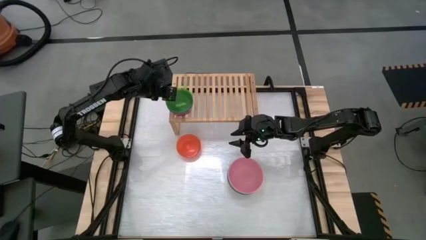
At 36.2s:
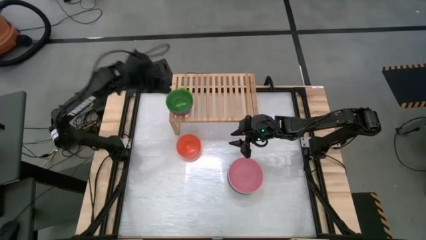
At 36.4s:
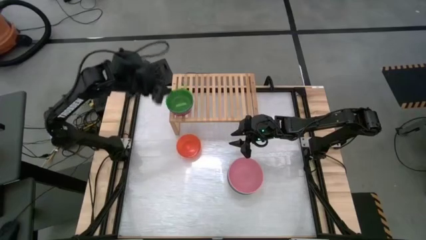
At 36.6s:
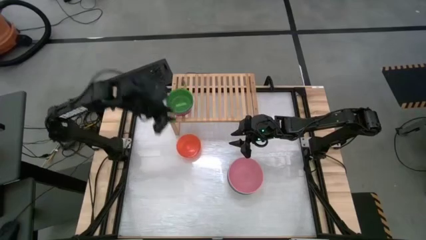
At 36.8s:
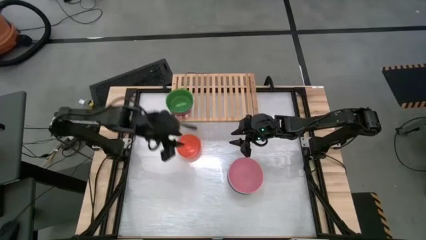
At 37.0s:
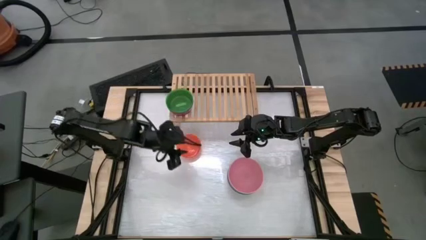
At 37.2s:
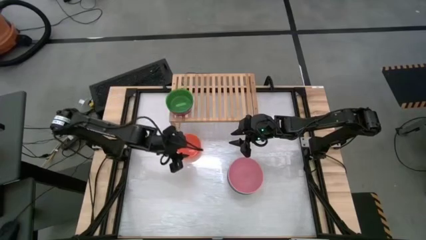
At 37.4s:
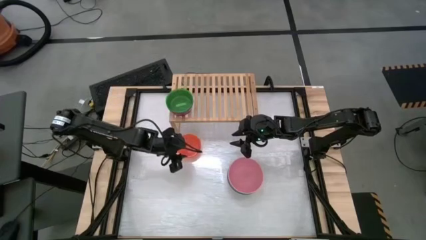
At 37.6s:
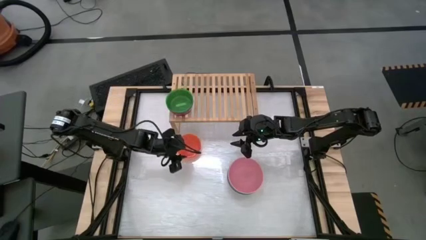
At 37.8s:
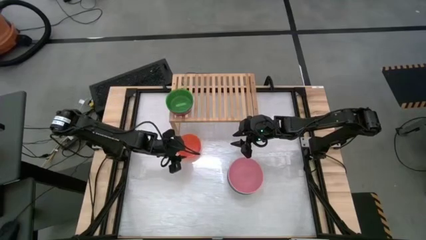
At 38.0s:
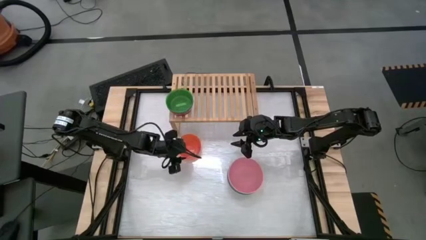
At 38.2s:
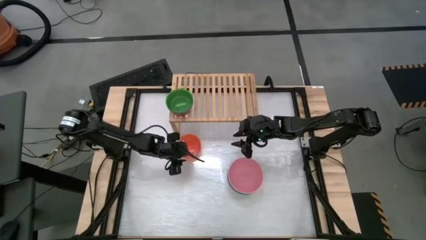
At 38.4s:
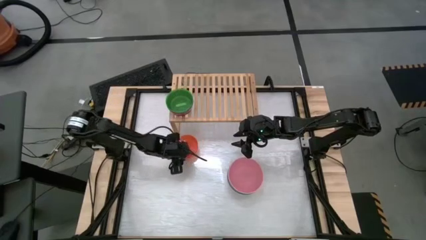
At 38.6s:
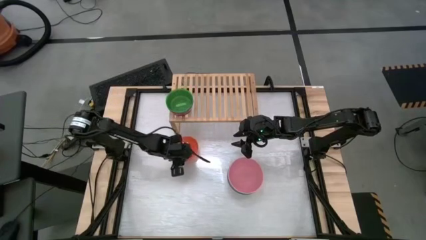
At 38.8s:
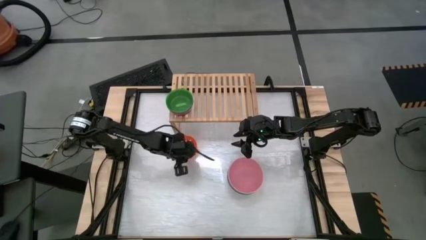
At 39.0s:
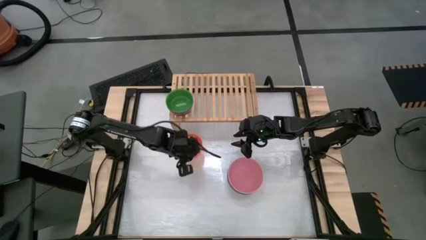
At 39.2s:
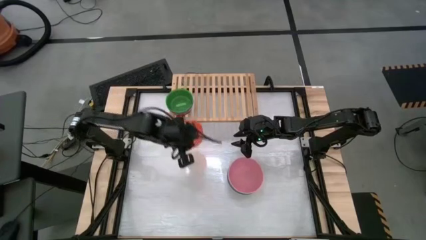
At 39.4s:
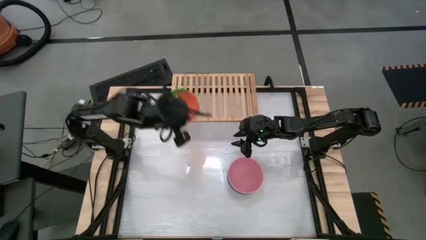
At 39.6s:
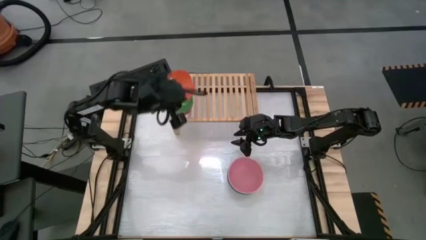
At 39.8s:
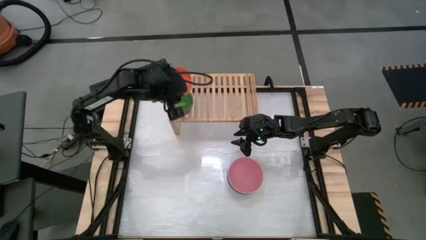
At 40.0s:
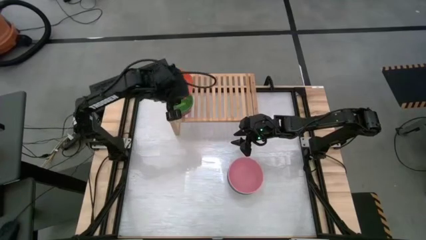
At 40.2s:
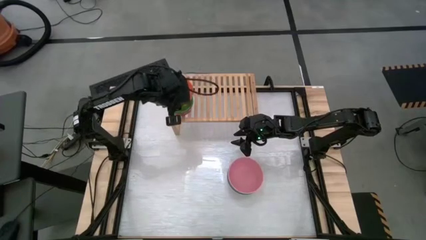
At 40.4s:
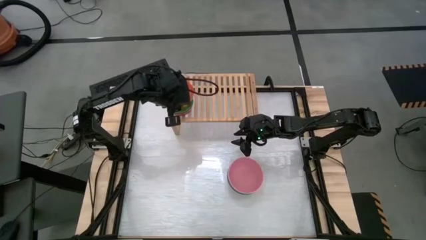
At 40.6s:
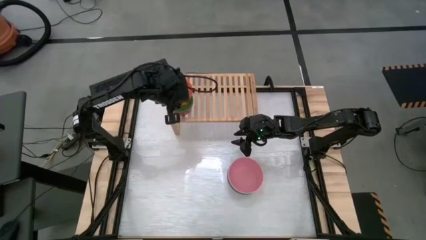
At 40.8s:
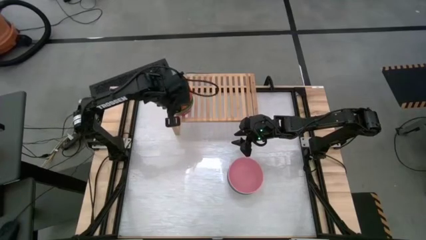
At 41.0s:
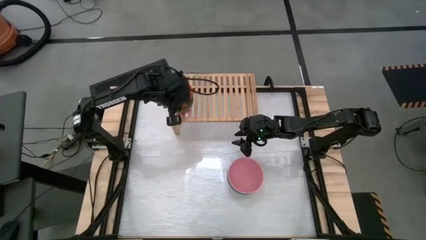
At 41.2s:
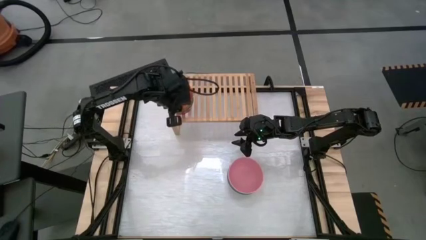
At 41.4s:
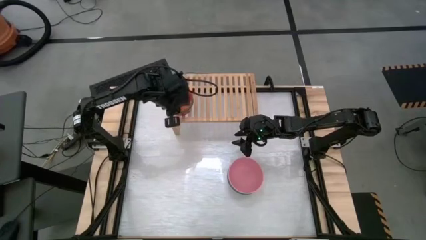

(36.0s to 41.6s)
Task: Place and stack bowls onto a shelf
Stack the orange bowl on top of the green bowl on the shelf

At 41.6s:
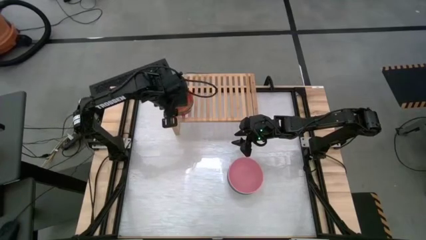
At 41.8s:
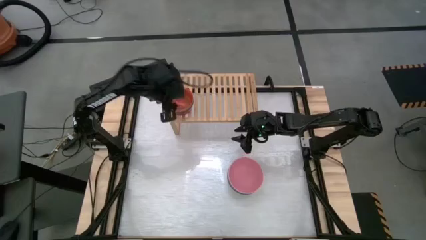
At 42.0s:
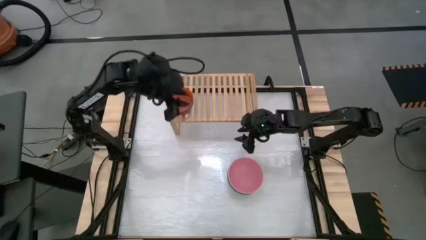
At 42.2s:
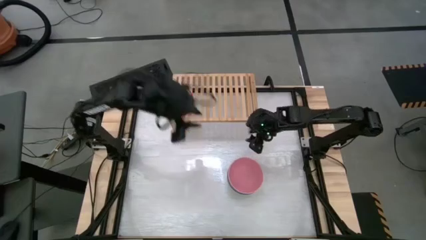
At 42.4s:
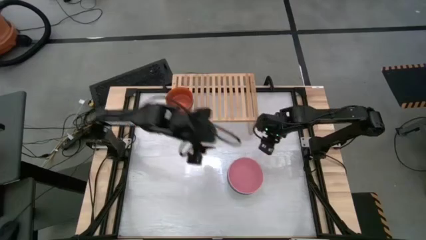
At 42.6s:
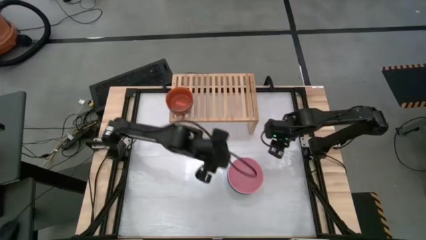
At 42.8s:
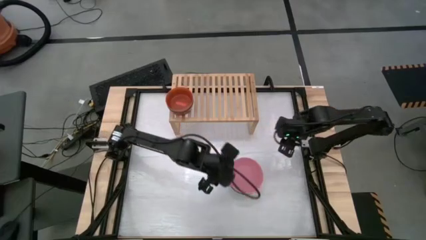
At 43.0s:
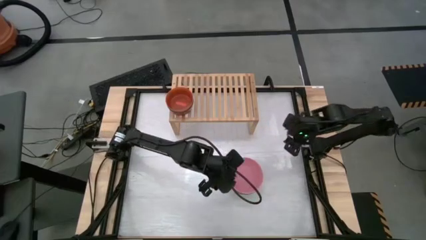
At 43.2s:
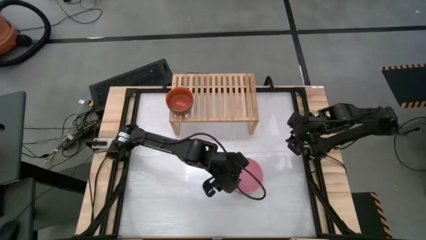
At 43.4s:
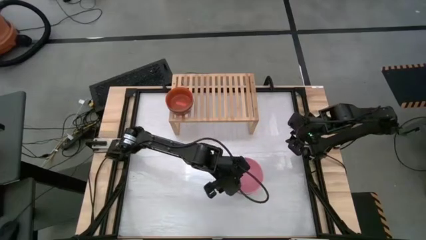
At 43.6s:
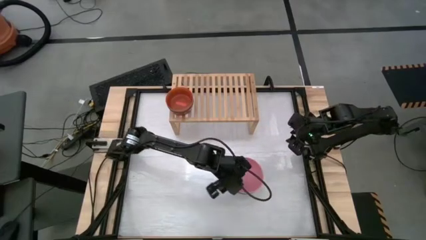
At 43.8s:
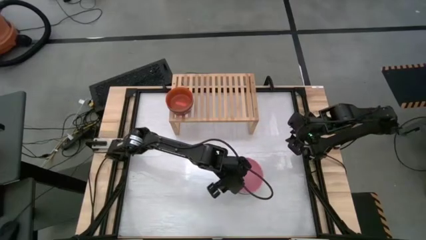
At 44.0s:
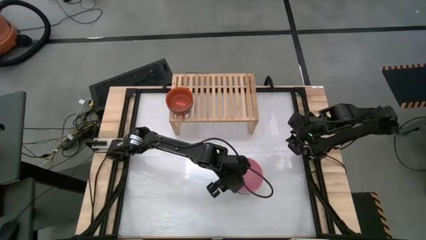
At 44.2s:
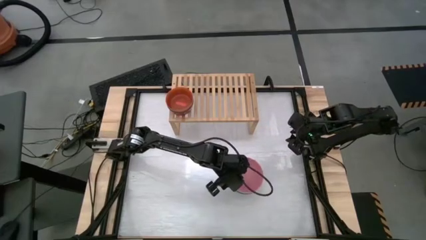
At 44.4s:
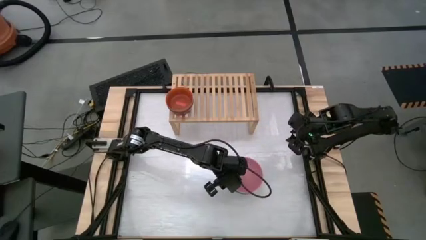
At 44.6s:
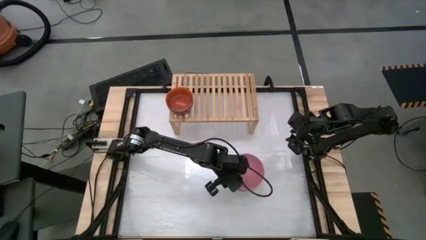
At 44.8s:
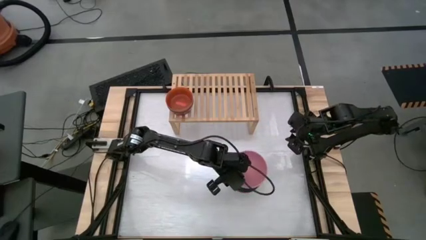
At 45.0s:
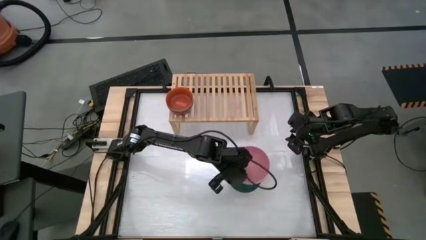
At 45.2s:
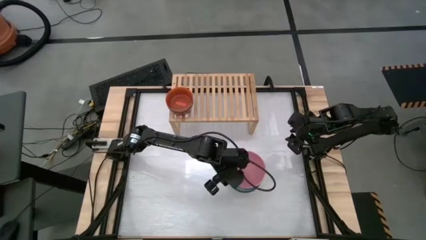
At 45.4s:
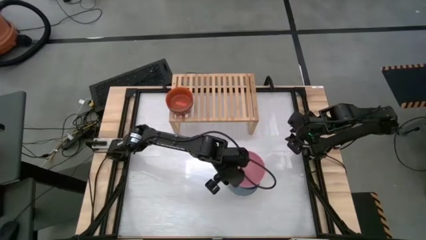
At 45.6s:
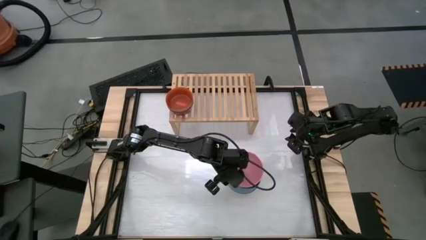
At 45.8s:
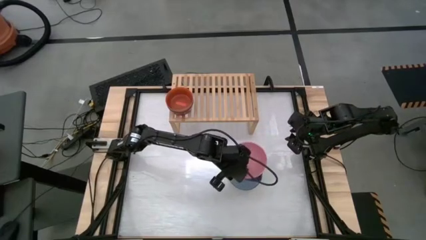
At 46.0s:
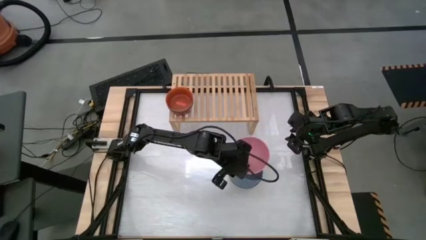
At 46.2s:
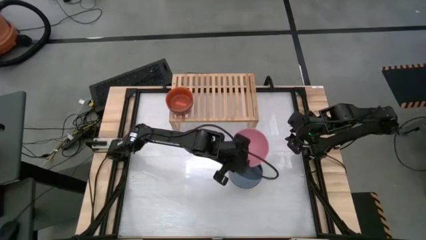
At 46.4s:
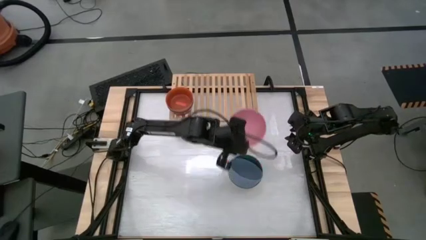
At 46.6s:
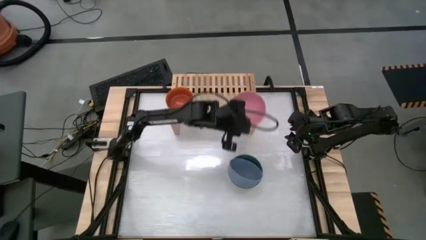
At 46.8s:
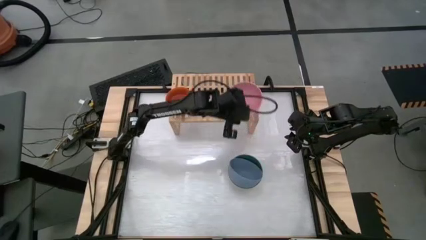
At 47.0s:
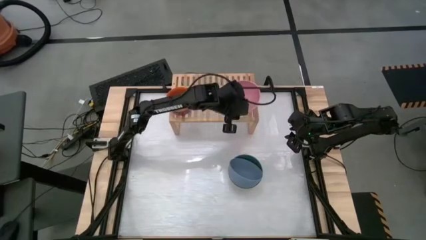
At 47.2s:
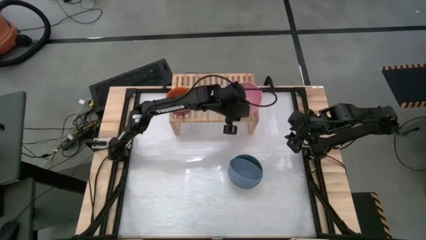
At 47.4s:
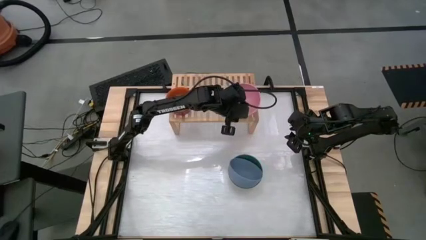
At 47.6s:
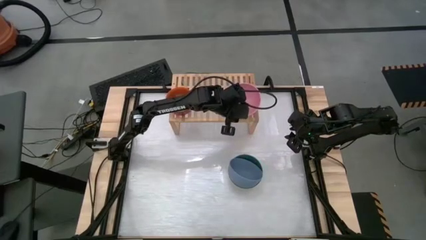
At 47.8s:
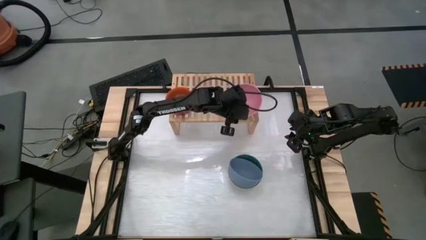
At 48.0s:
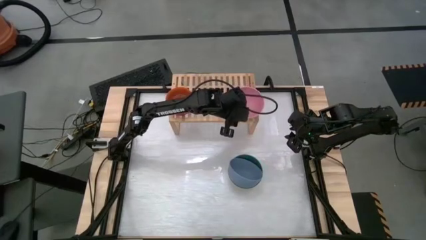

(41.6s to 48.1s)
Put the light red bowl on the shelf

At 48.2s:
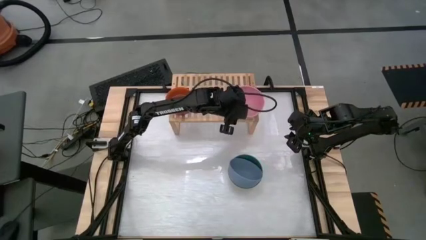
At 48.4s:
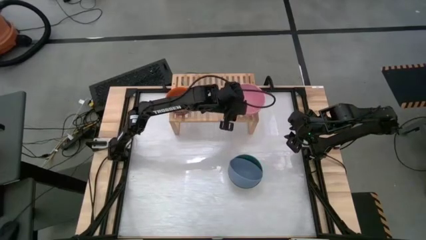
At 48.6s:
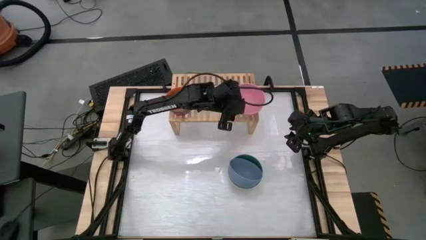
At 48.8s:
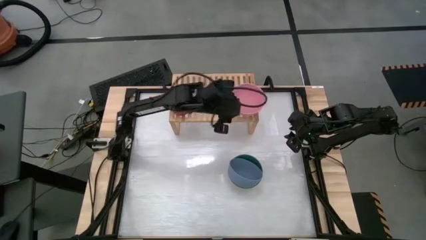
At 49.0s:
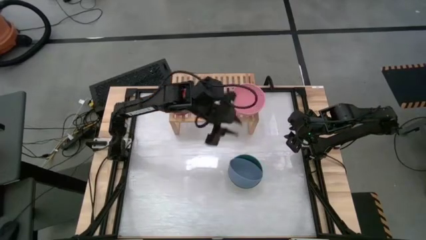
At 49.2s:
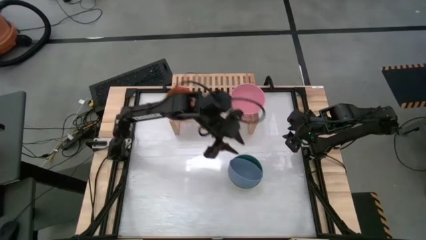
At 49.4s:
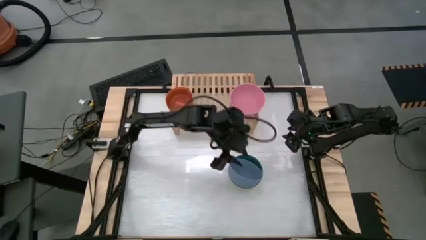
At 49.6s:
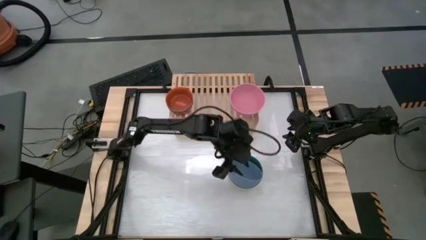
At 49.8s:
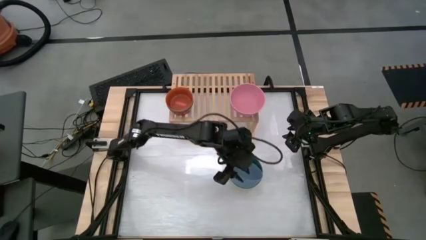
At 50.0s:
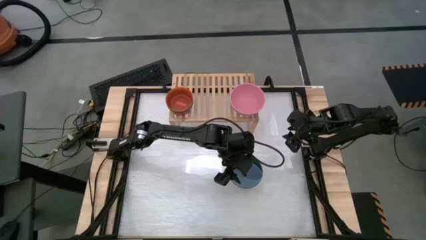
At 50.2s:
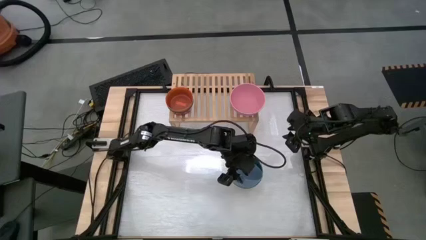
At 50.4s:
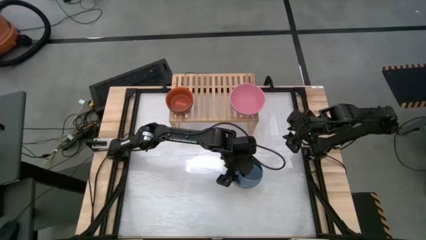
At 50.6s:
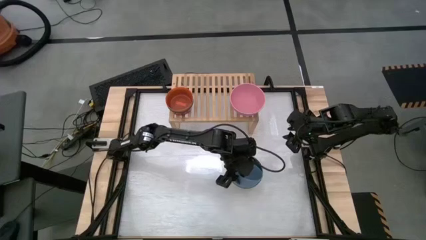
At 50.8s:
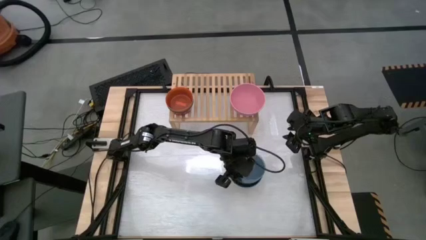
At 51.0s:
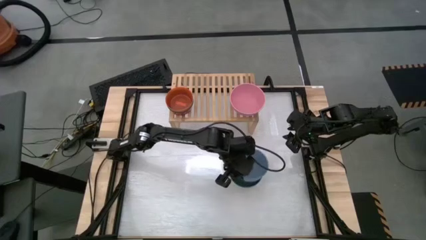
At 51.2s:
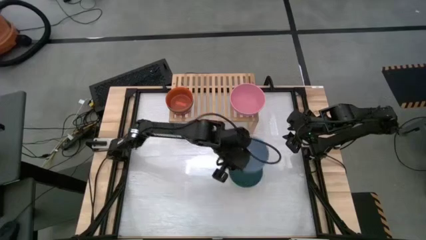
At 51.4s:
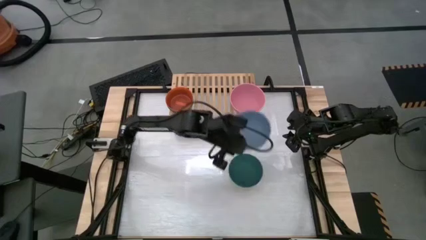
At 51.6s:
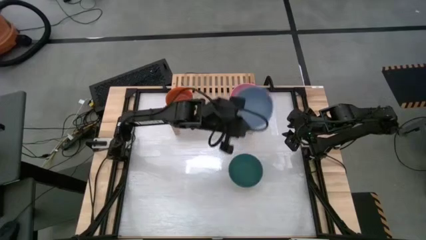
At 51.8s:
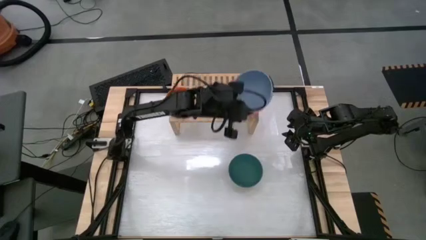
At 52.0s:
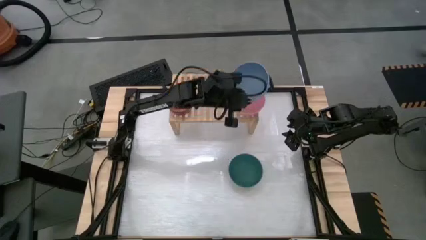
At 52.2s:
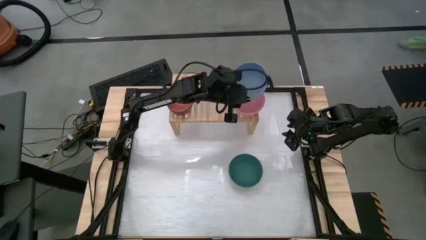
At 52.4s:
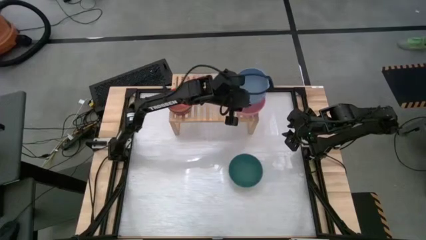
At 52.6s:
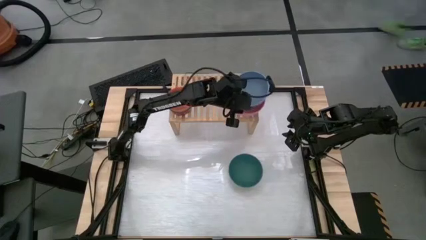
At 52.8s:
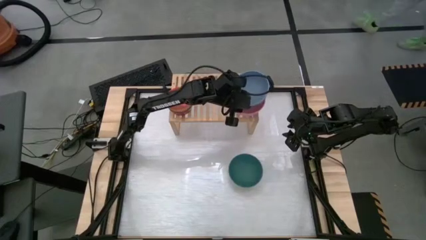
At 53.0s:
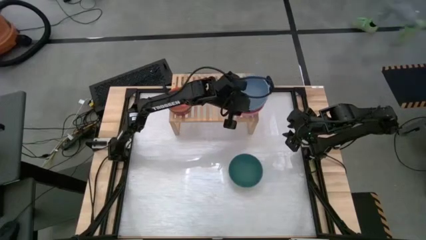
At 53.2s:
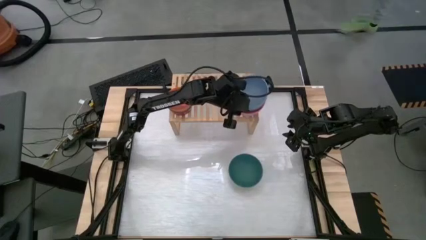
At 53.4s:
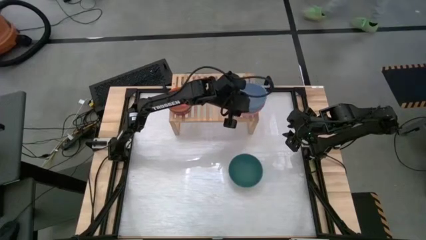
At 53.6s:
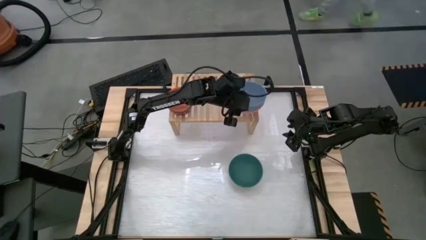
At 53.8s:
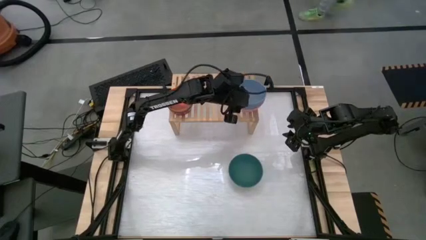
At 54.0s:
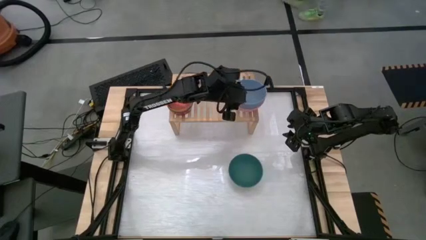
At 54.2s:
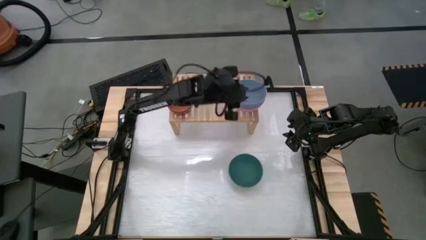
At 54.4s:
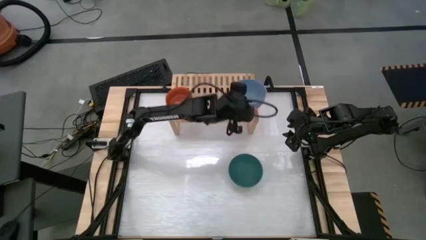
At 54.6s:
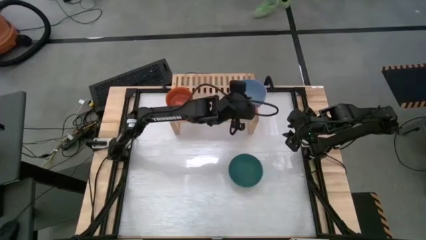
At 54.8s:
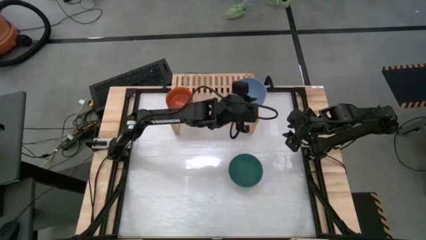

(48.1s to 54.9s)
Stack the light blue bowl on top of the light red bowl on the shelf
